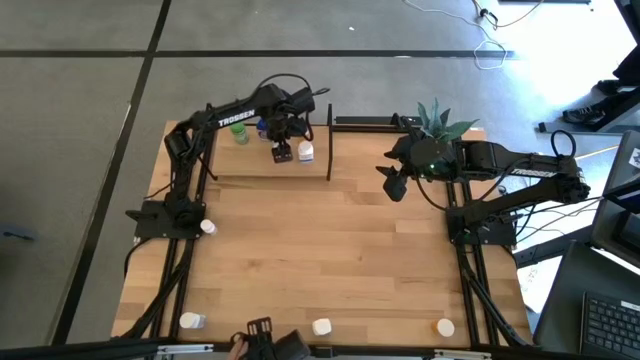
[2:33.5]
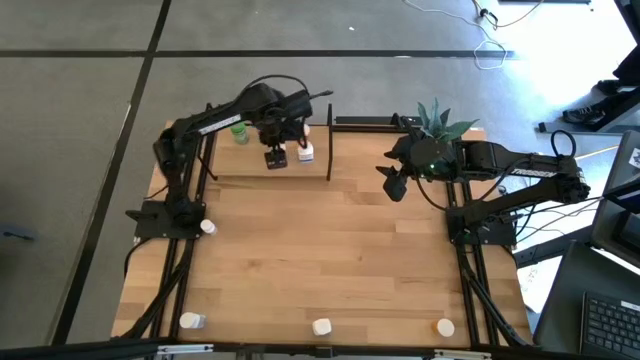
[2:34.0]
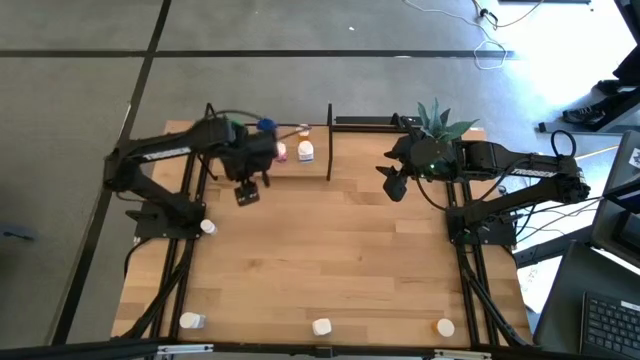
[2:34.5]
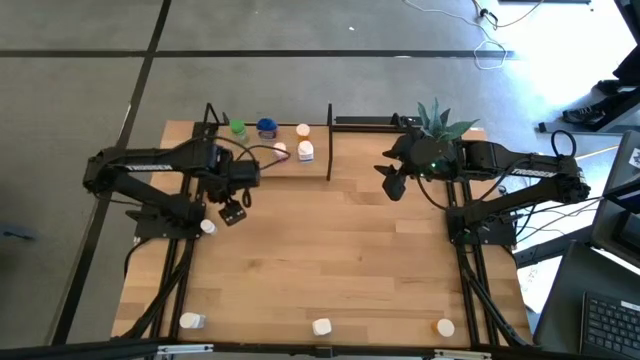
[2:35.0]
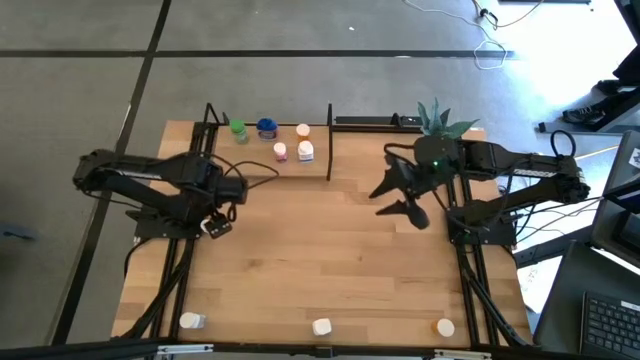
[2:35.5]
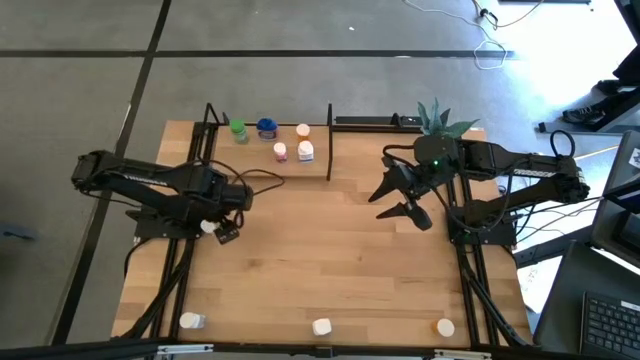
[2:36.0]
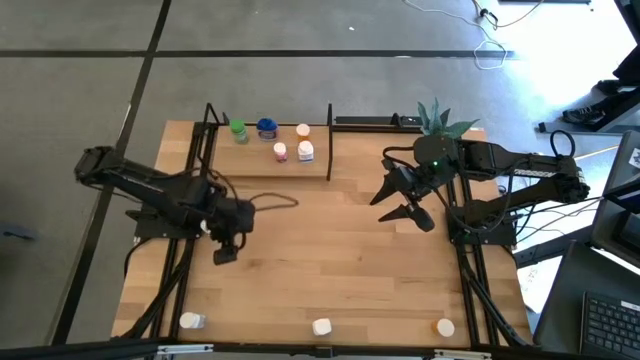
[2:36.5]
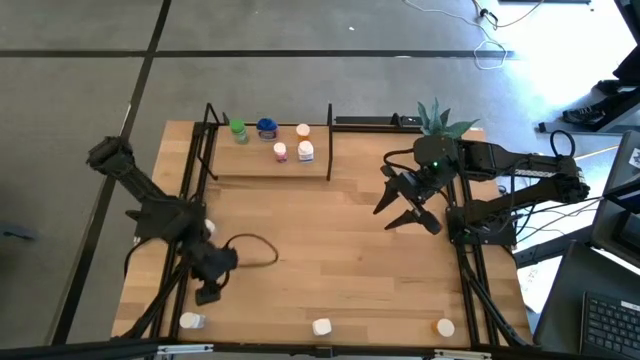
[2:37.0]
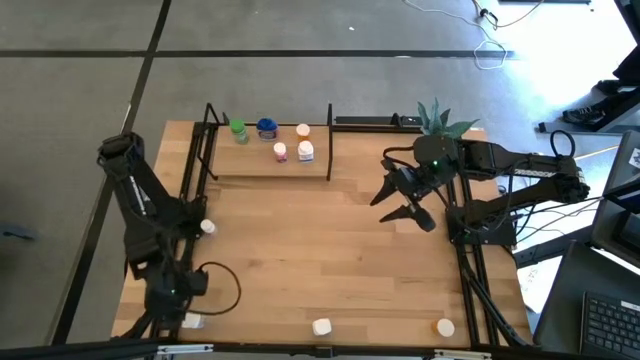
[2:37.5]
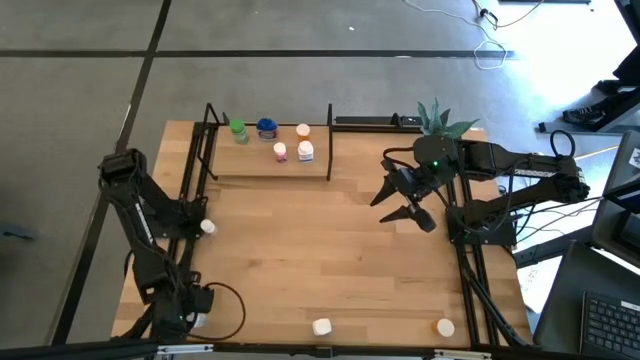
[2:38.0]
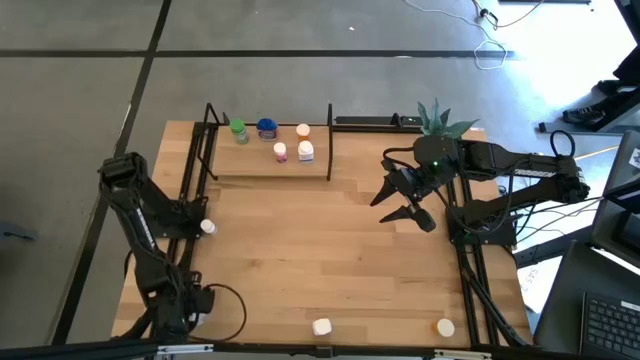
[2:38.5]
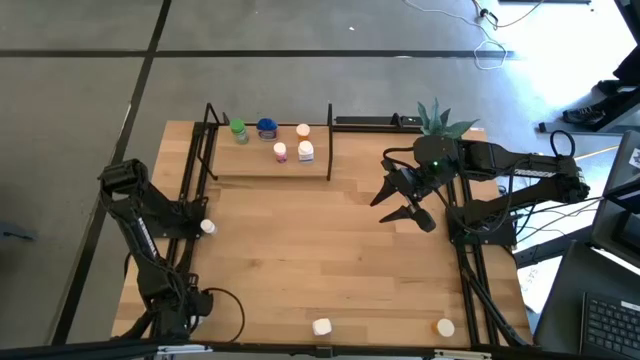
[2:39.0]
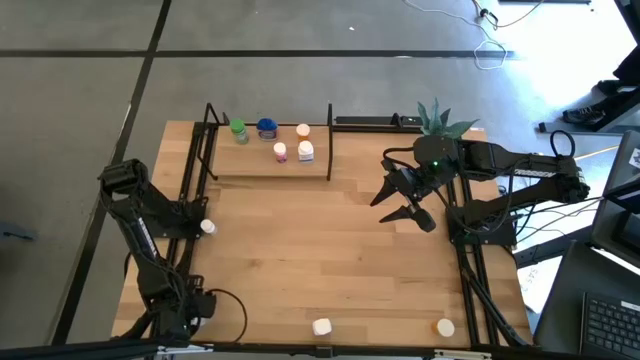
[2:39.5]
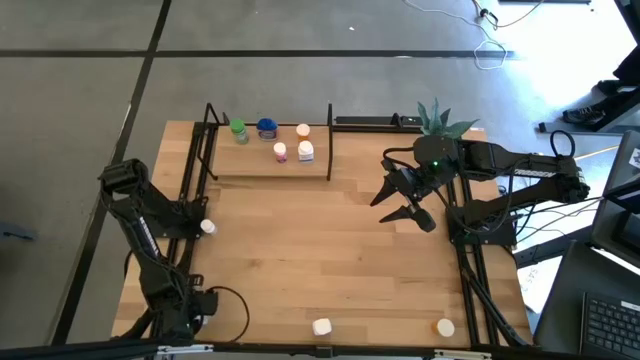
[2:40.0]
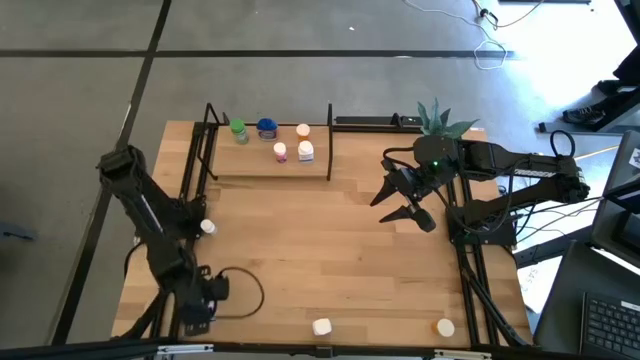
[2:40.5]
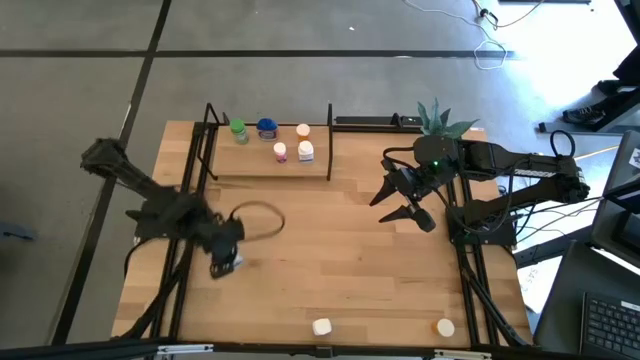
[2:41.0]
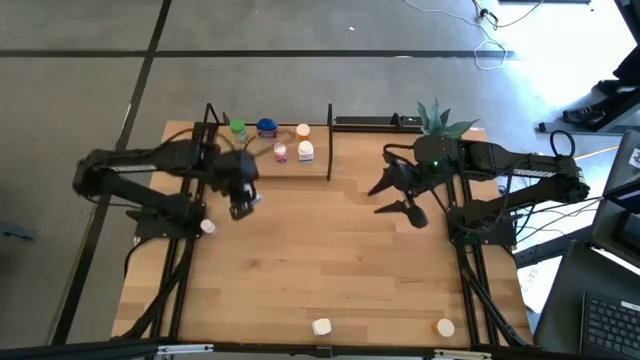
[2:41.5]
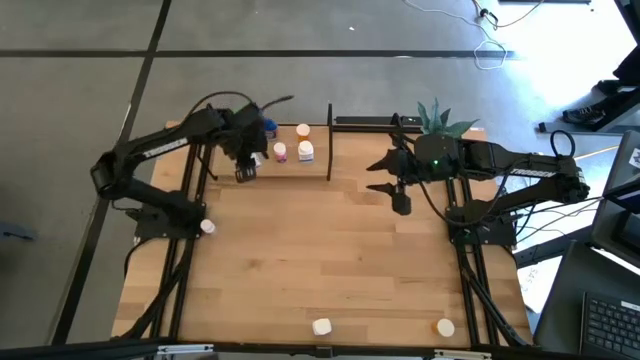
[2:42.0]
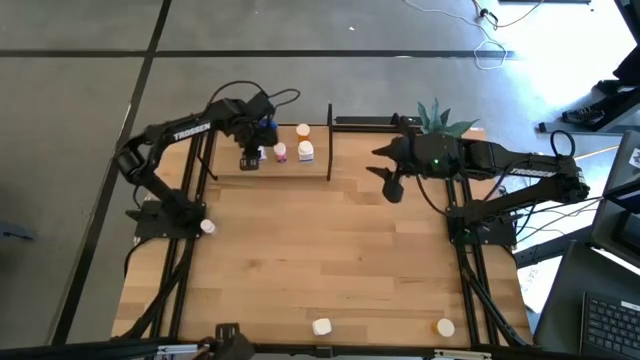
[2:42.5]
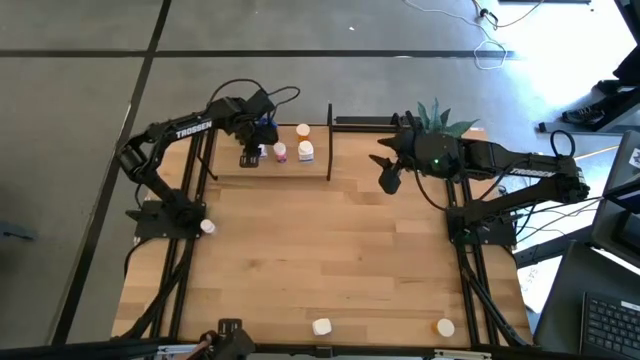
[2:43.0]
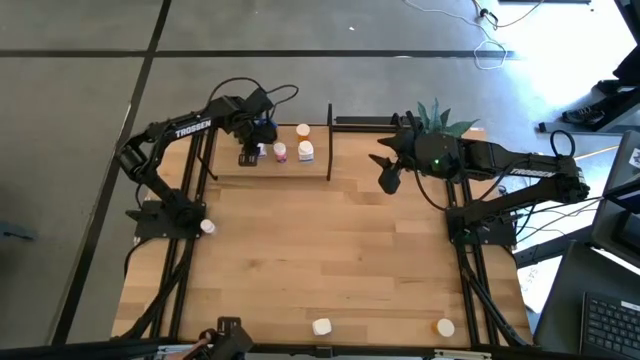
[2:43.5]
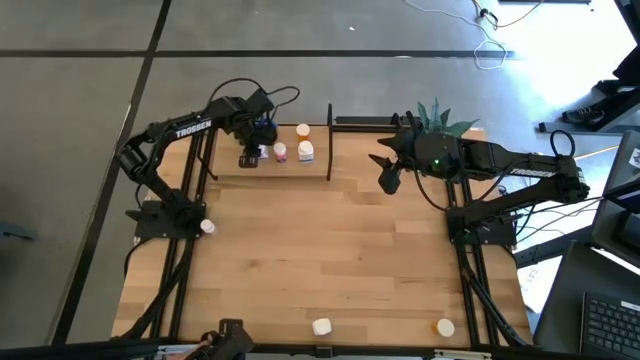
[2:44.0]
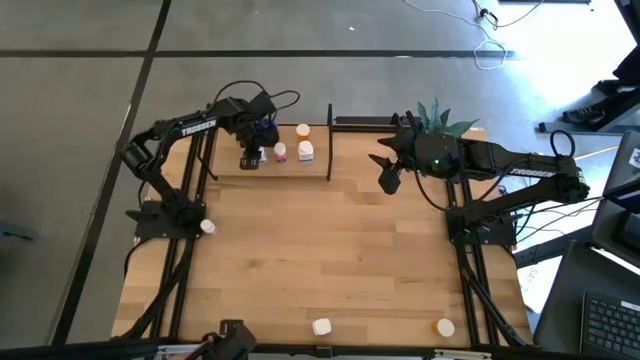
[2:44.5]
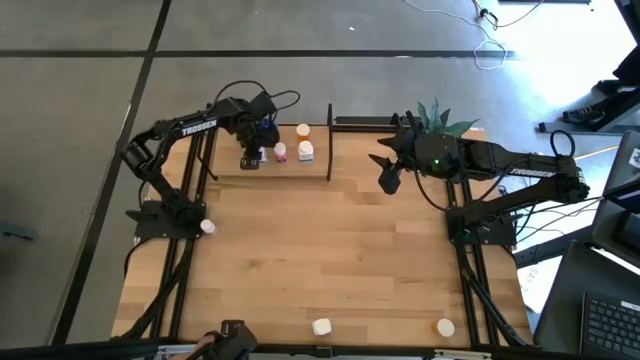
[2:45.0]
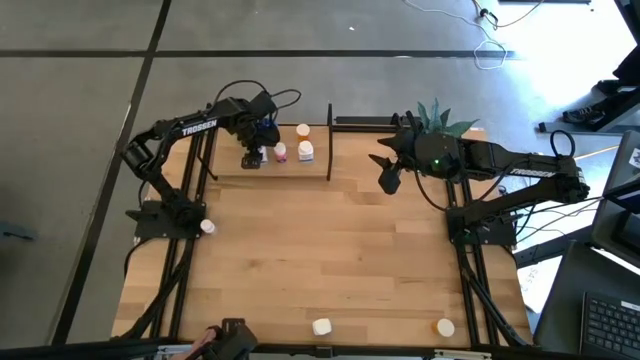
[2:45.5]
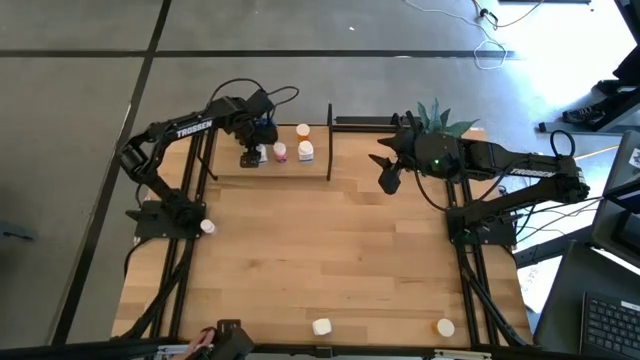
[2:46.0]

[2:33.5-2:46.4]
Task: Pick and place medicine bottles onto shelf by color
Put the white pill bottle on the shelf
